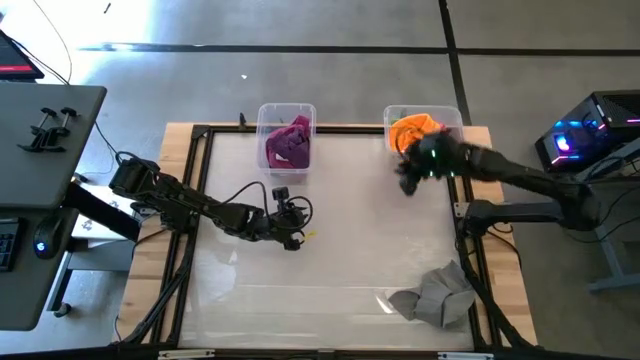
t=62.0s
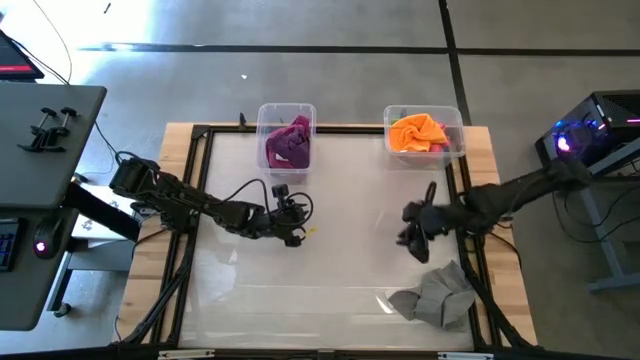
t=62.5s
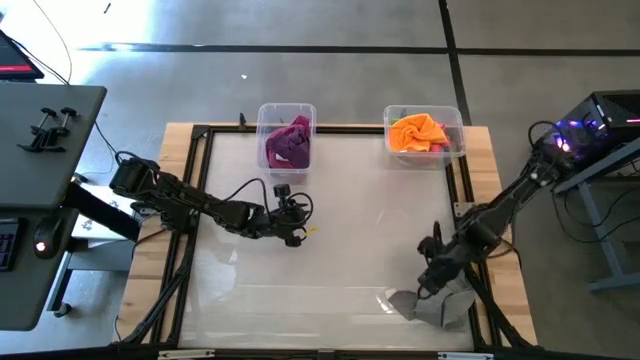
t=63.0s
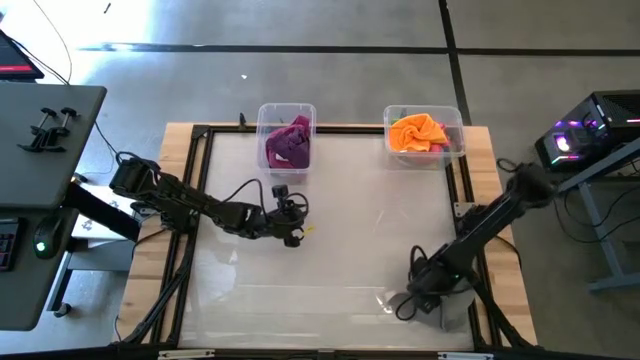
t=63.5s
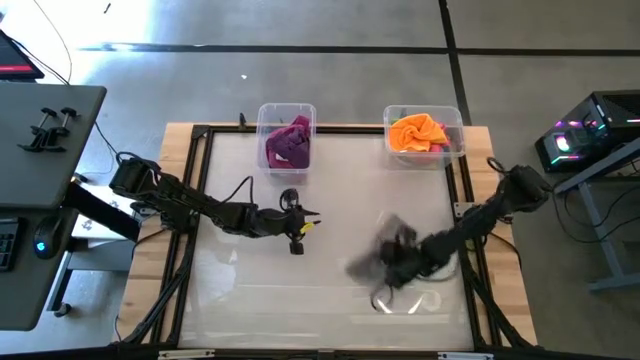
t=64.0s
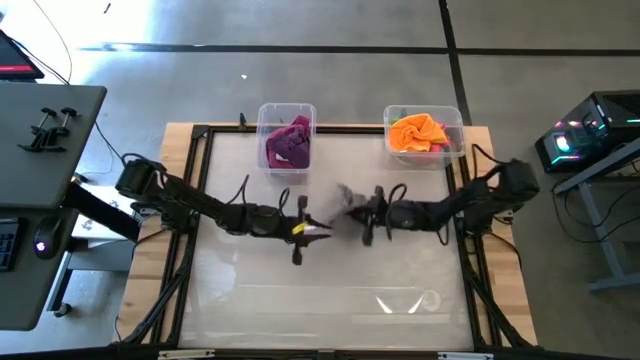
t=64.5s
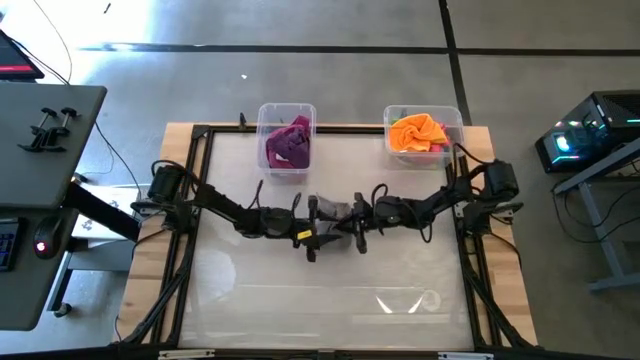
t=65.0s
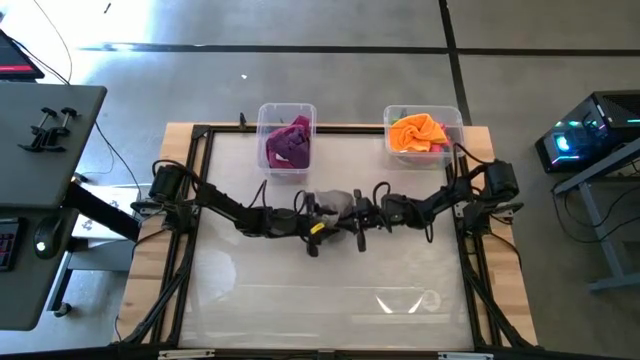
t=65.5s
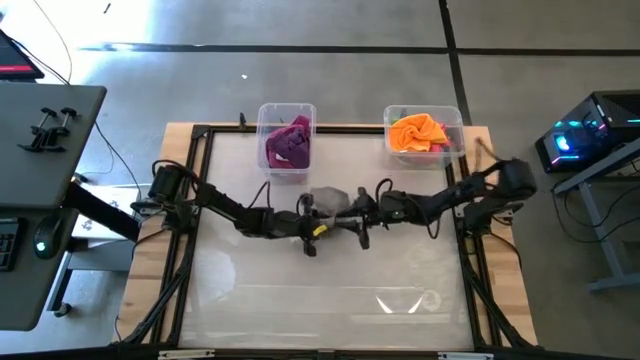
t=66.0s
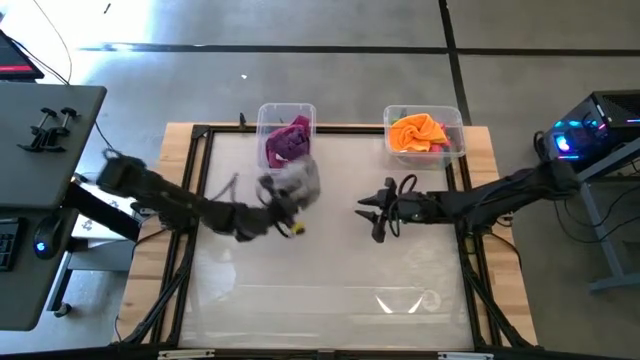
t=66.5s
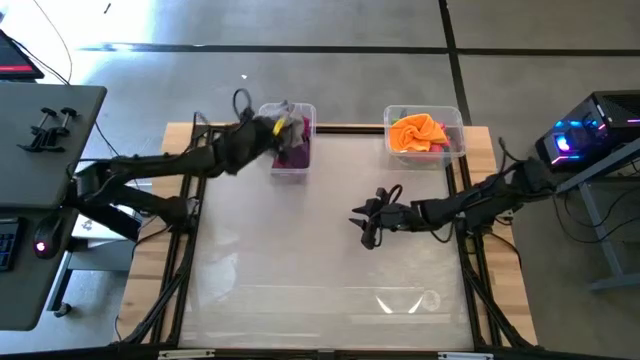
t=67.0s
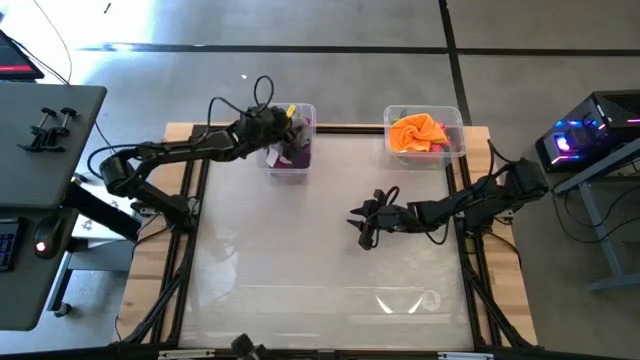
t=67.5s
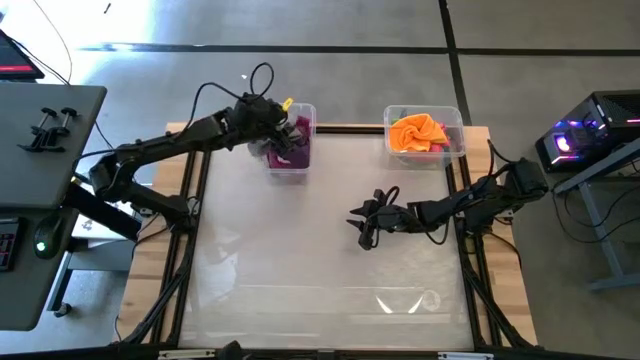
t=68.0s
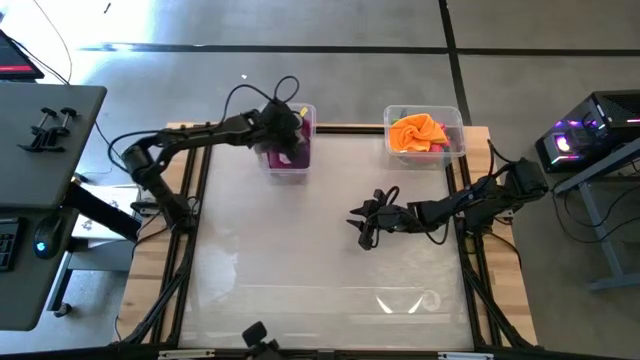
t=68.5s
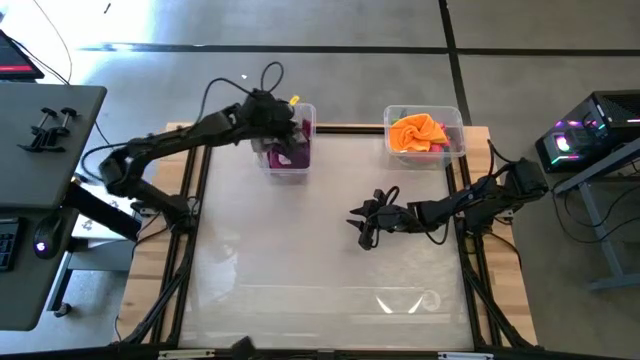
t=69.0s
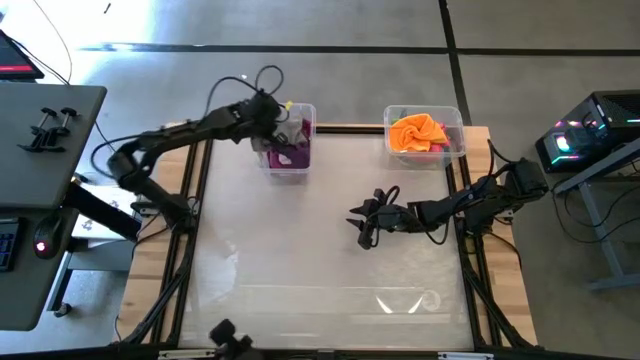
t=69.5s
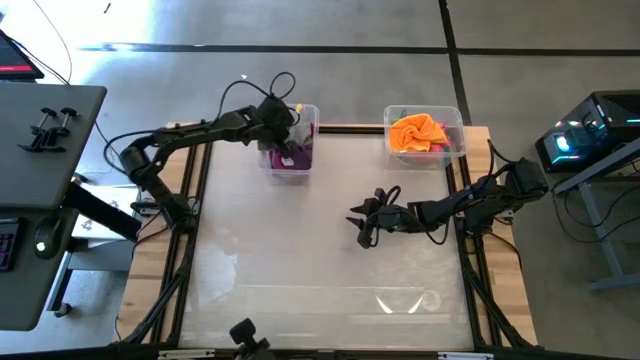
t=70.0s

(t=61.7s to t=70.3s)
Task: Sort towels by color in basket
Put the gray towel into the left transparent bin

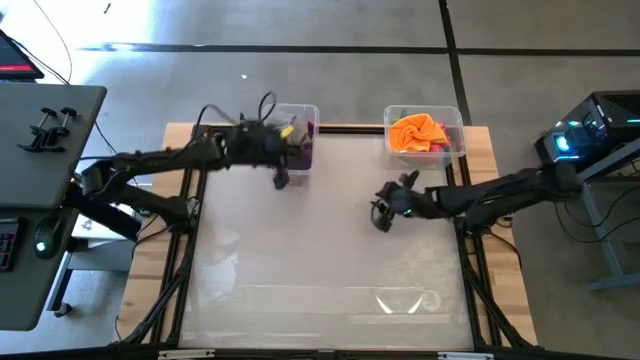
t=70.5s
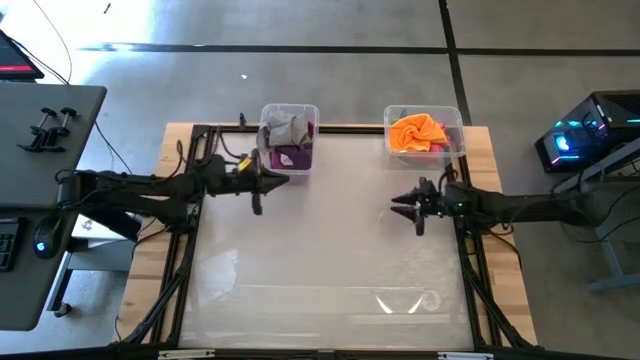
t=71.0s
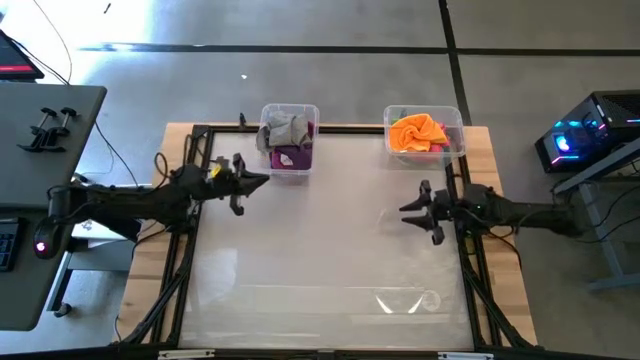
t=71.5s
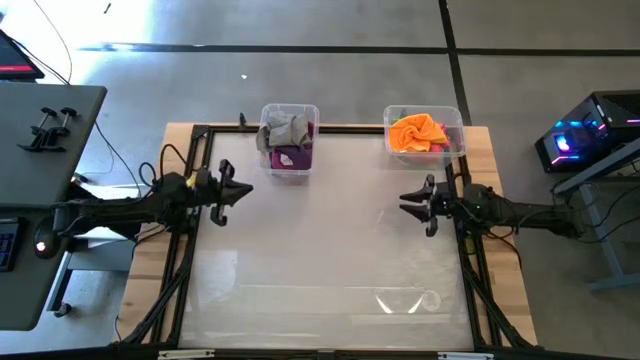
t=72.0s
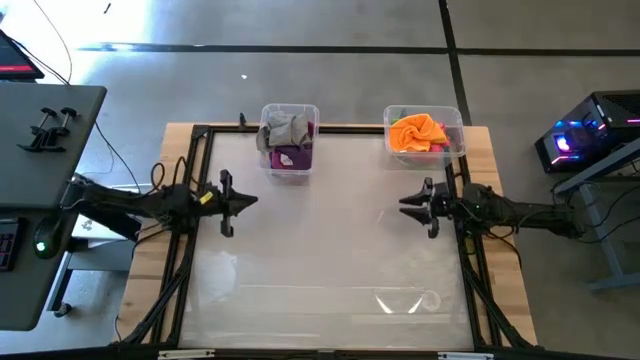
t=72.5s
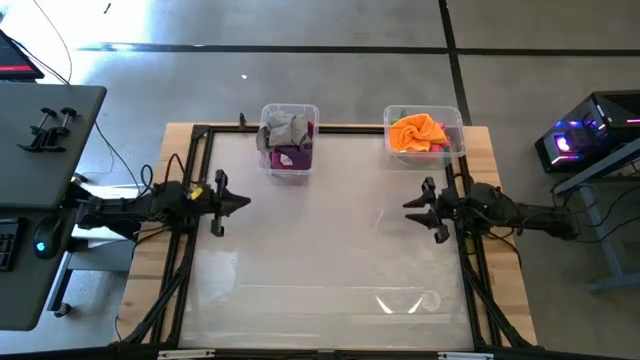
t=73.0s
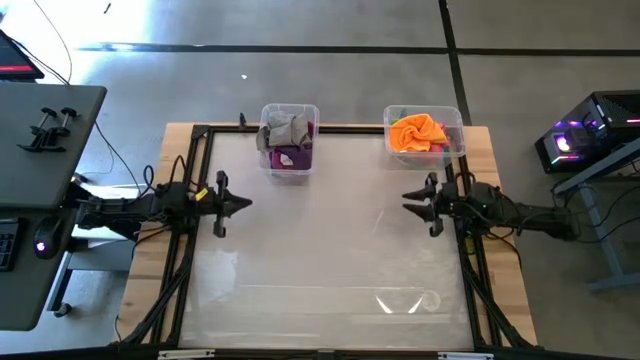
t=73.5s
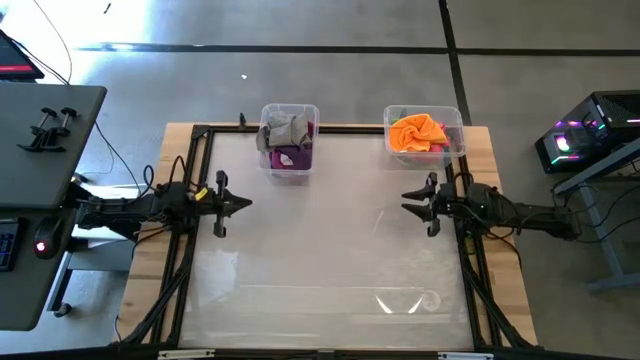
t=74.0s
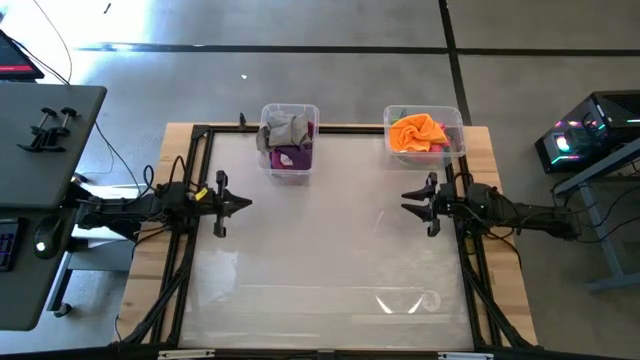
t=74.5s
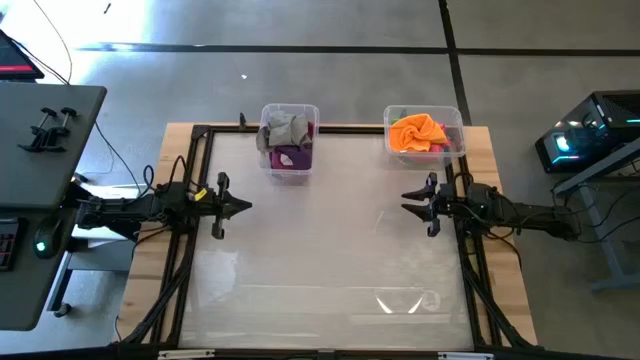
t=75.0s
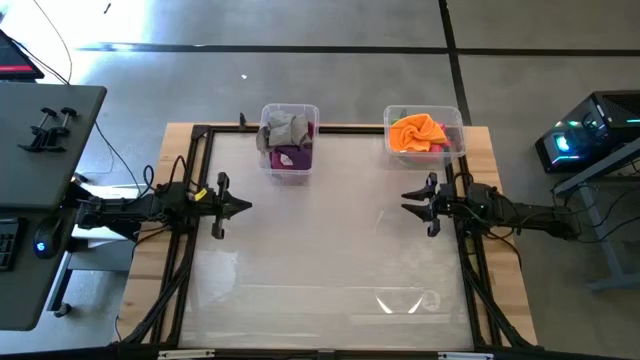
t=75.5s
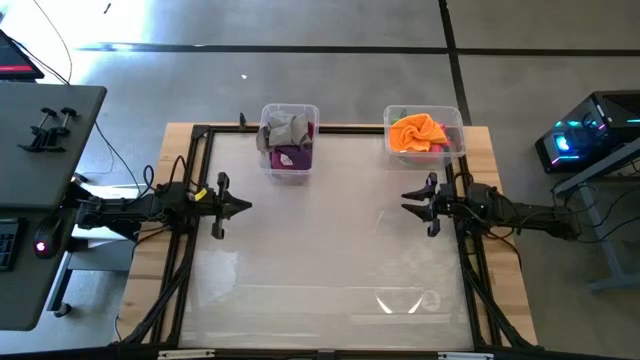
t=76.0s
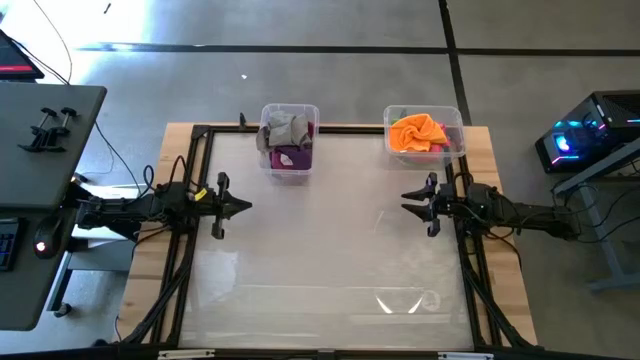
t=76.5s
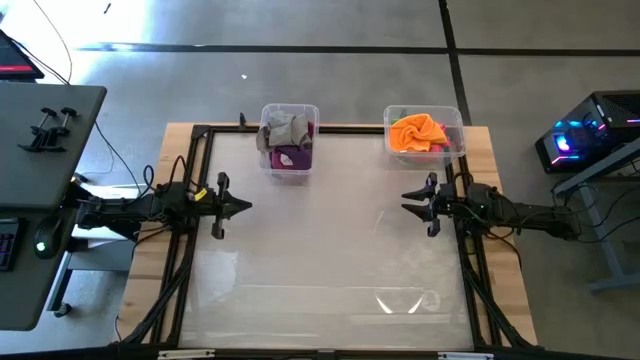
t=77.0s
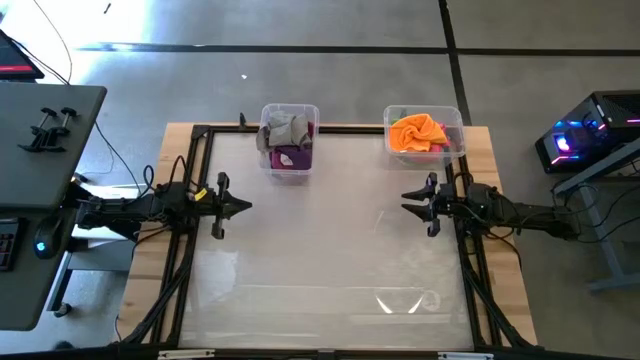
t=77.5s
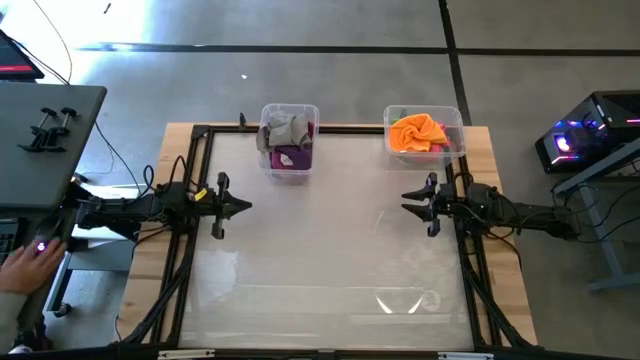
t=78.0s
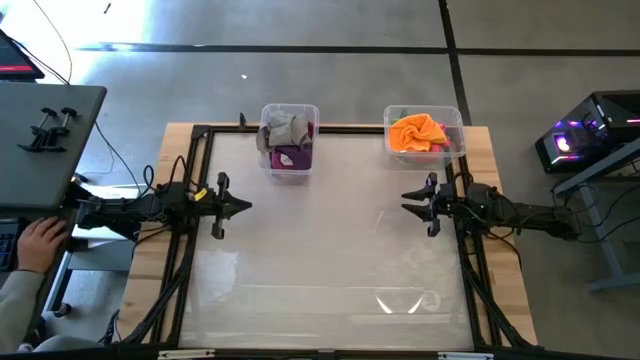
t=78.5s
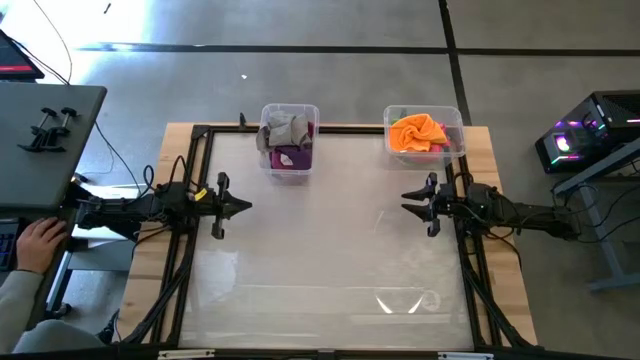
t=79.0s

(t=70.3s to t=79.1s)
Return to Home Position

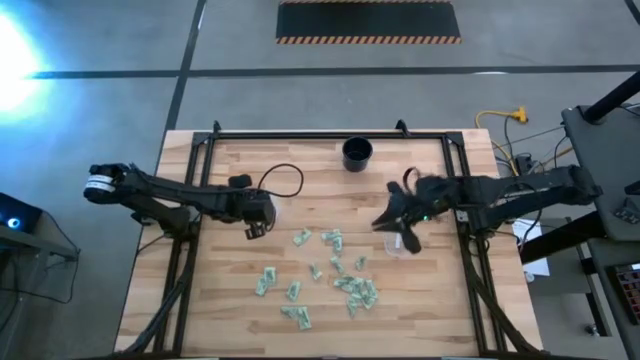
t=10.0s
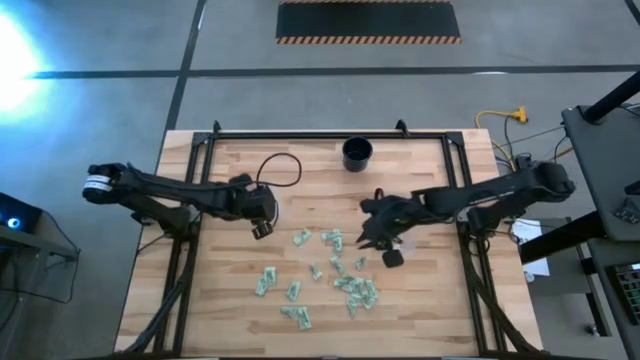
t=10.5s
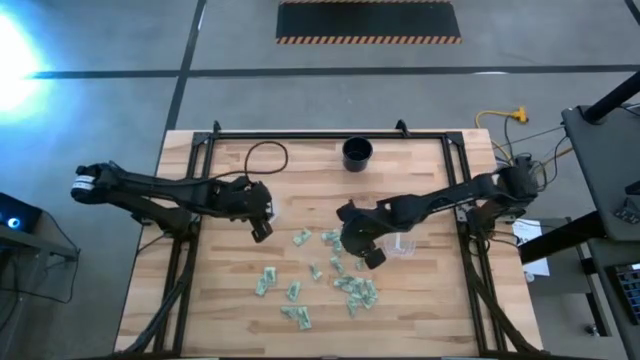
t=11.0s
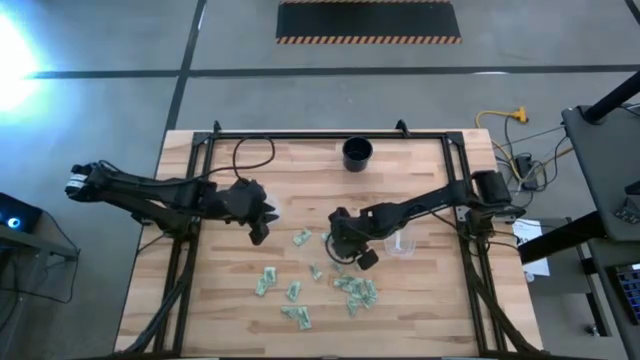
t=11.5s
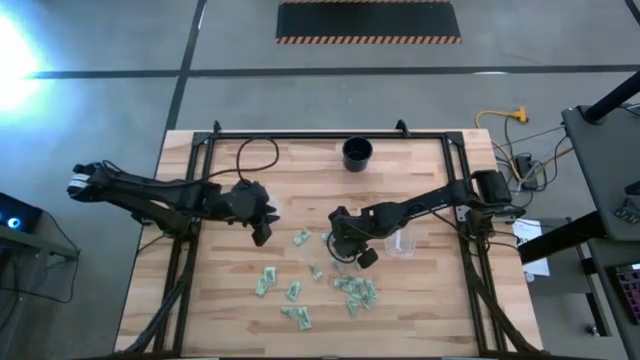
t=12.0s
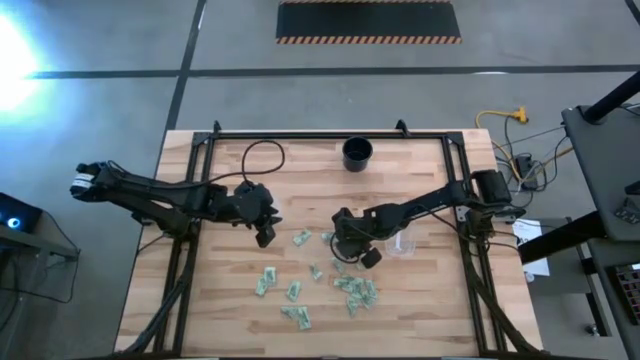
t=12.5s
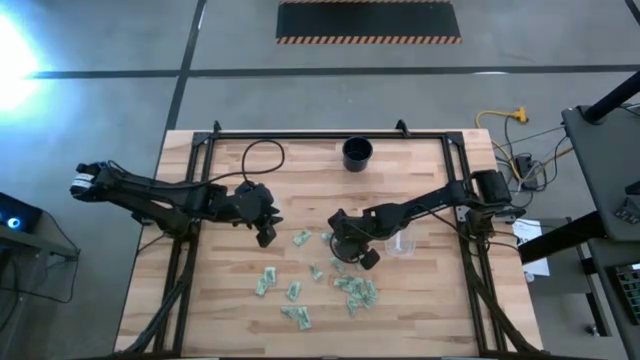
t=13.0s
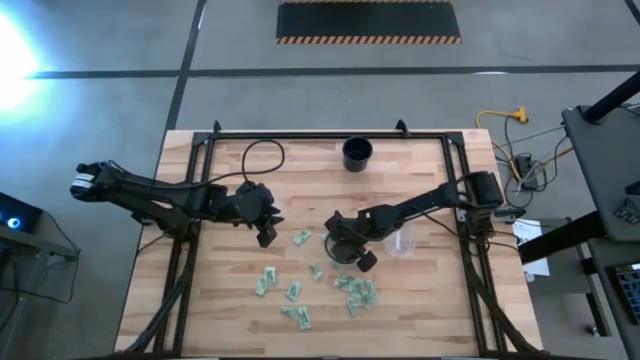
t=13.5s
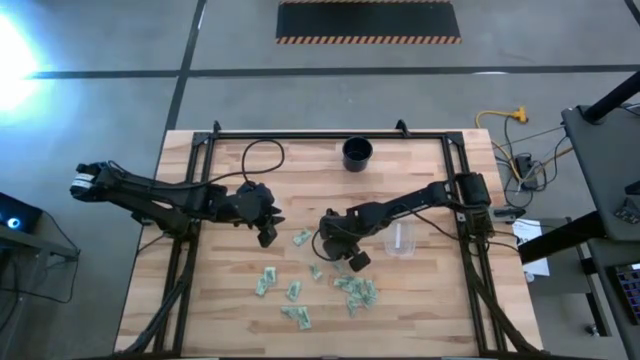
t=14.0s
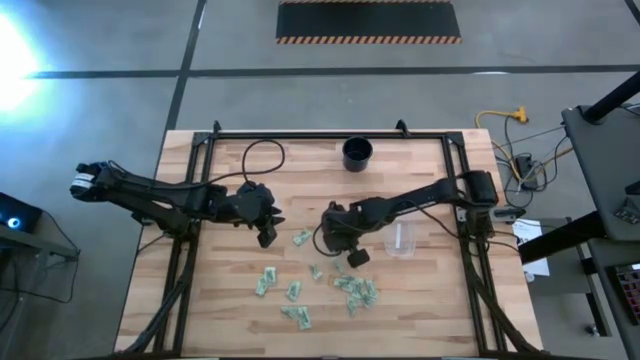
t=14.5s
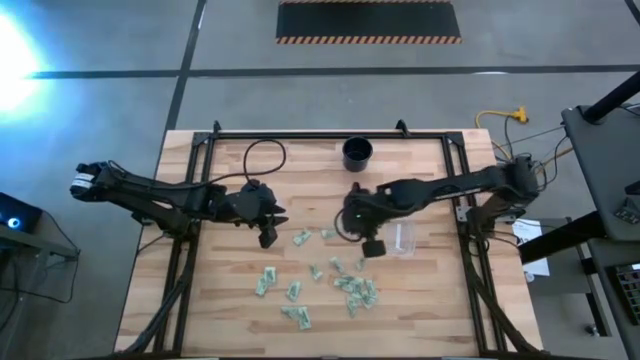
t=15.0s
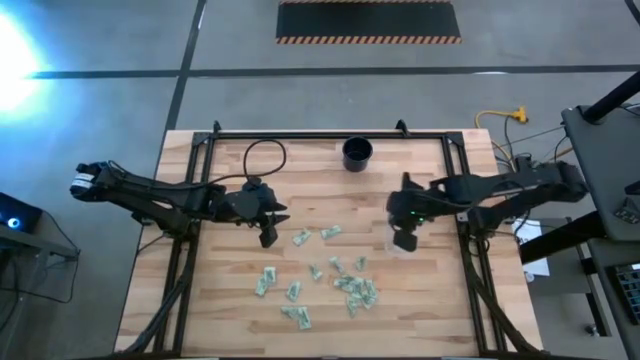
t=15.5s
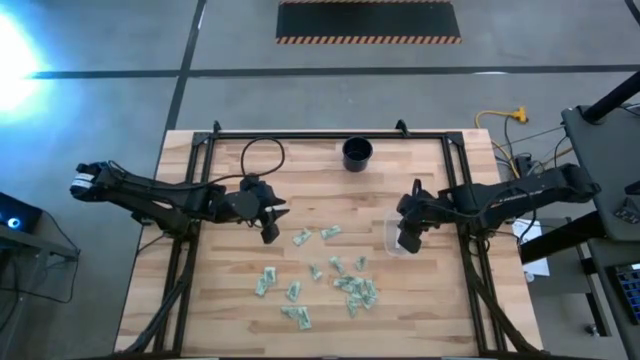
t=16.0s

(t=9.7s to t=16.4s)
Task: Pick and place items into bin
Put the white sweetener packet into the right transparent bin
